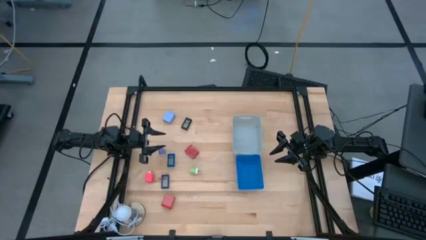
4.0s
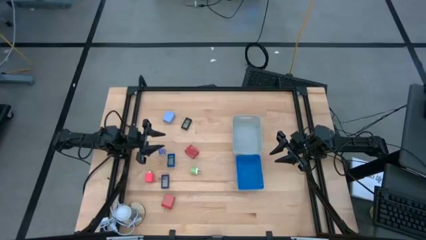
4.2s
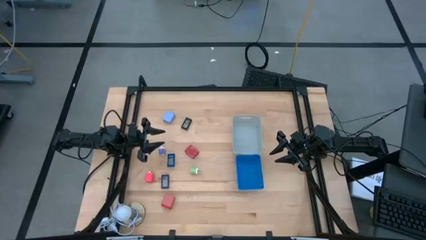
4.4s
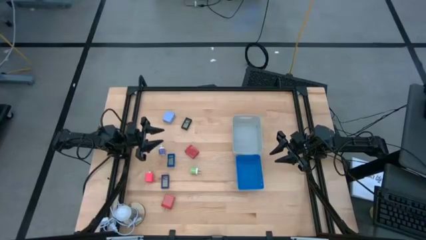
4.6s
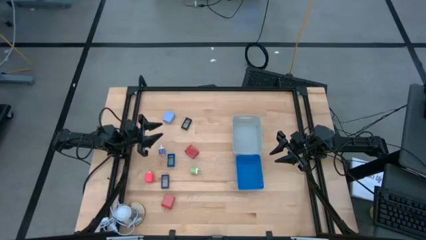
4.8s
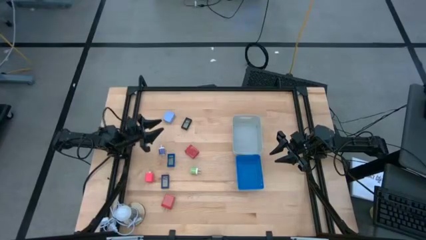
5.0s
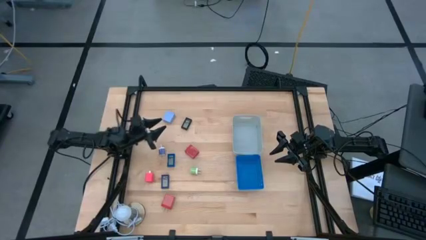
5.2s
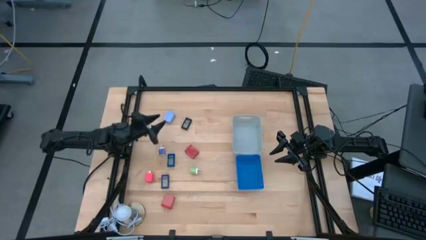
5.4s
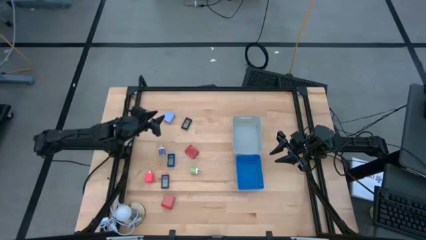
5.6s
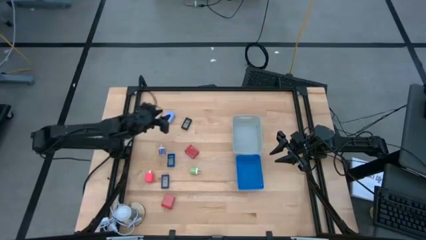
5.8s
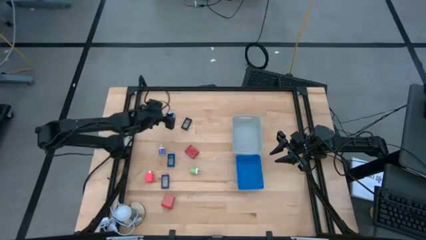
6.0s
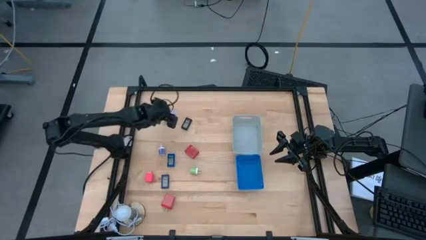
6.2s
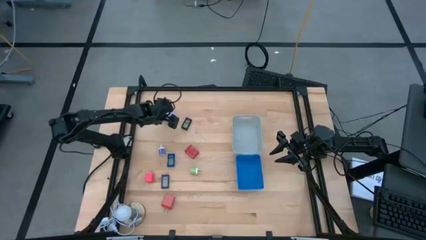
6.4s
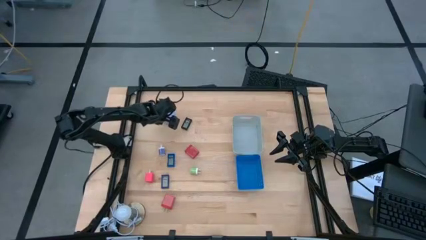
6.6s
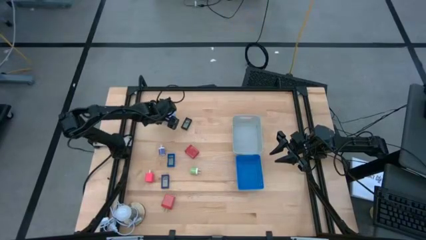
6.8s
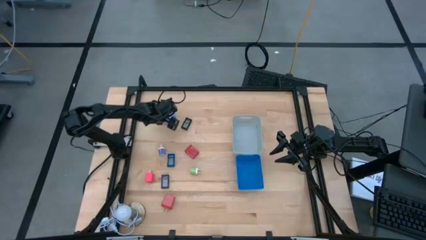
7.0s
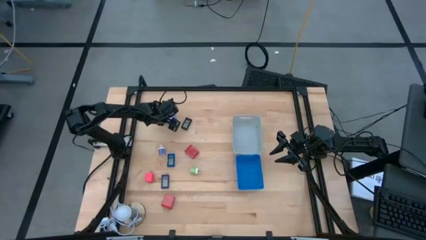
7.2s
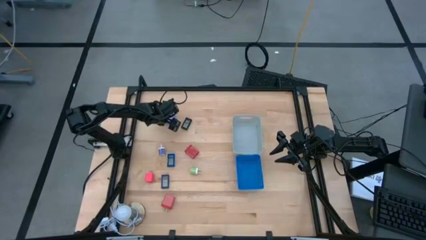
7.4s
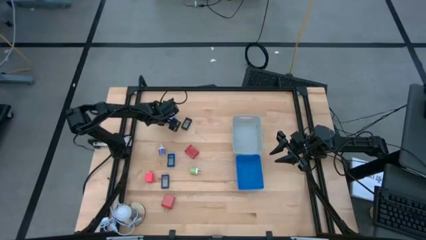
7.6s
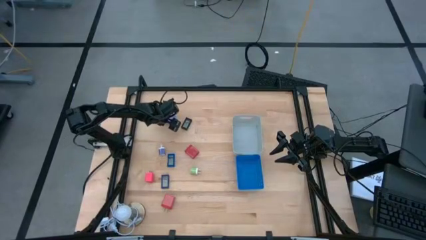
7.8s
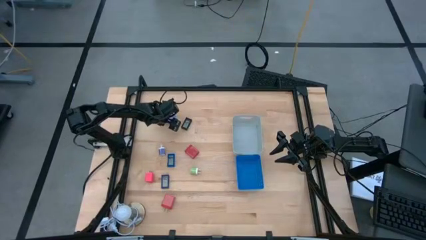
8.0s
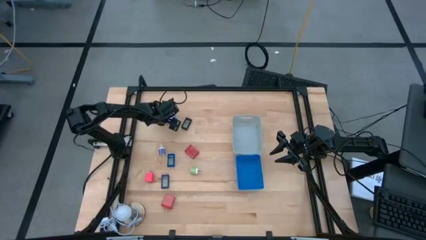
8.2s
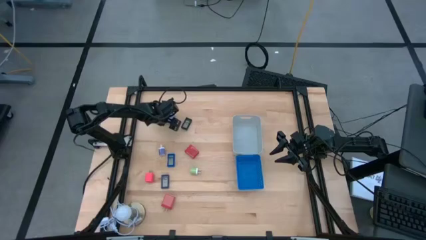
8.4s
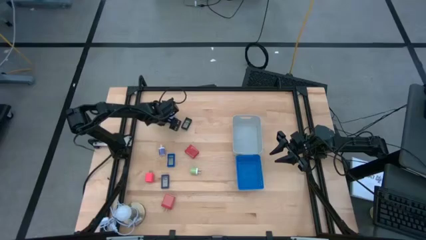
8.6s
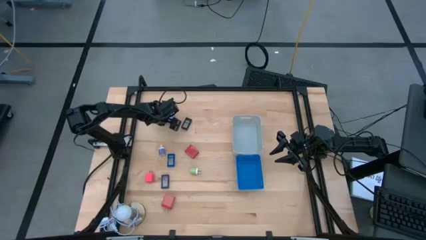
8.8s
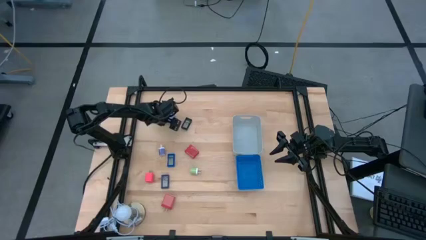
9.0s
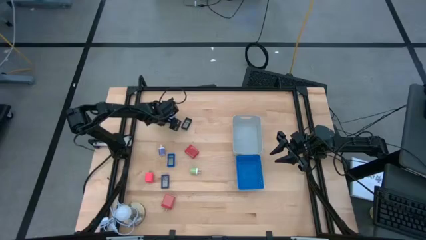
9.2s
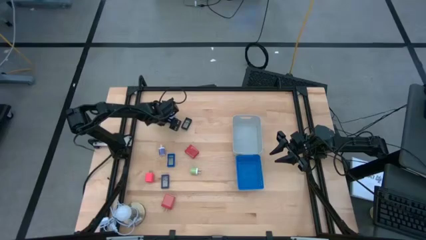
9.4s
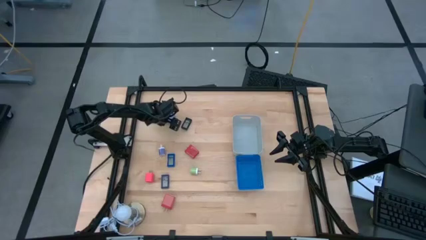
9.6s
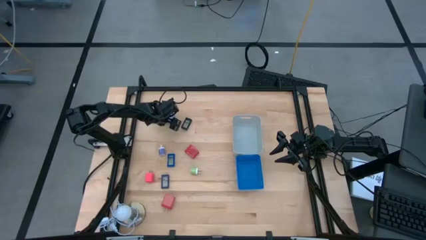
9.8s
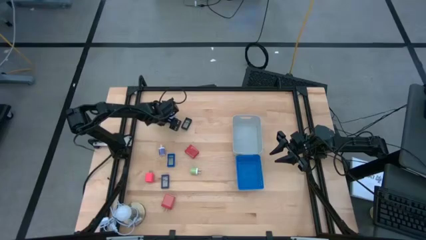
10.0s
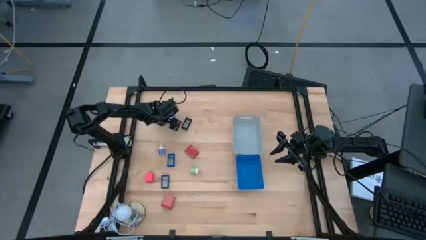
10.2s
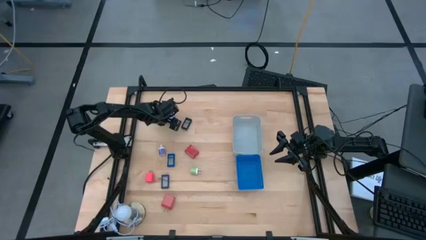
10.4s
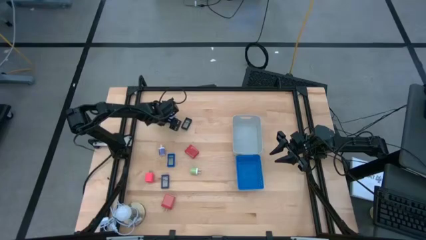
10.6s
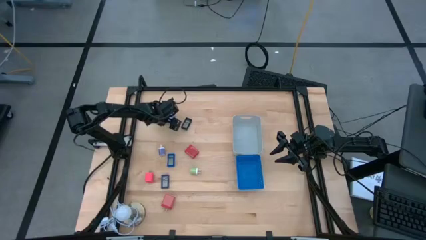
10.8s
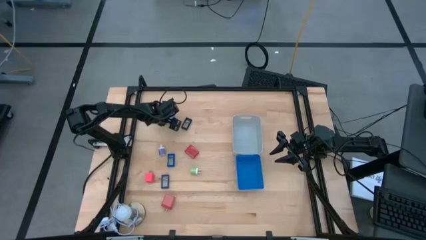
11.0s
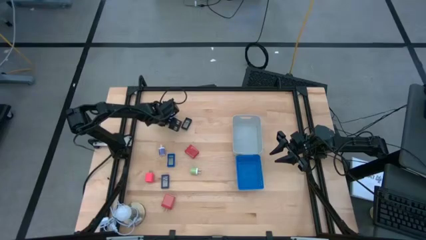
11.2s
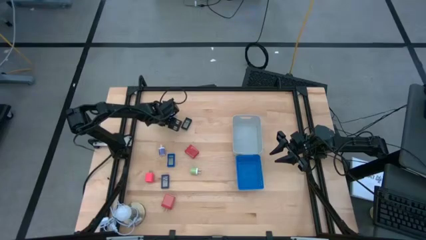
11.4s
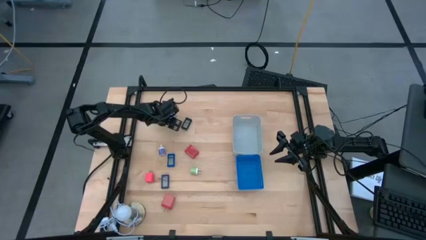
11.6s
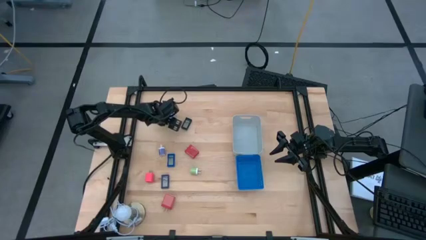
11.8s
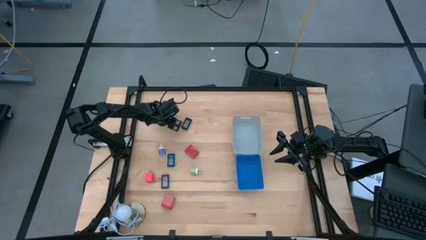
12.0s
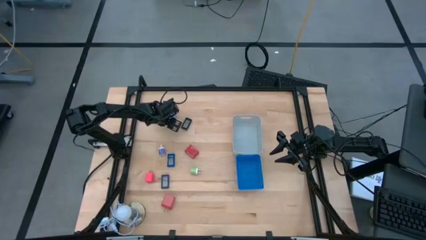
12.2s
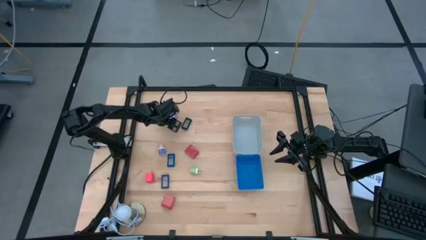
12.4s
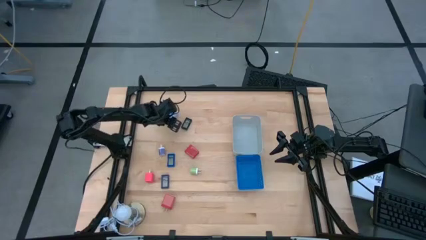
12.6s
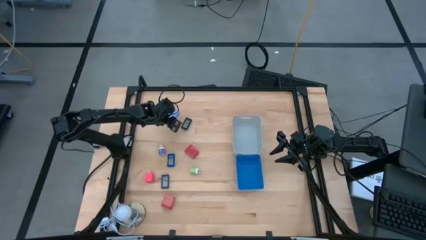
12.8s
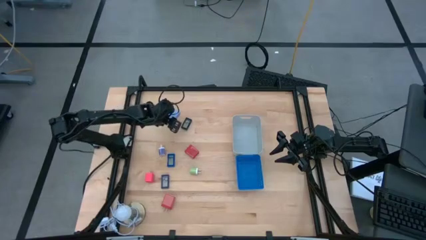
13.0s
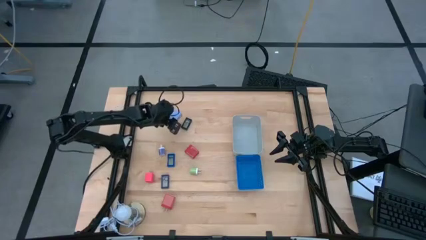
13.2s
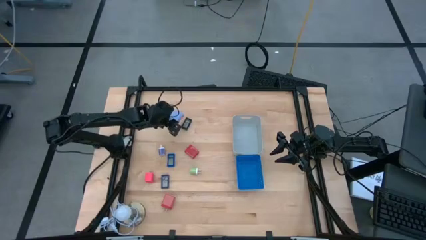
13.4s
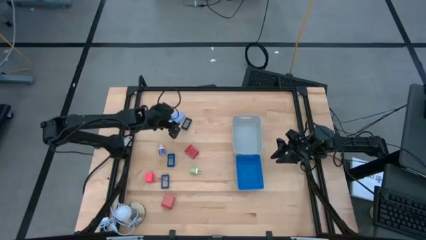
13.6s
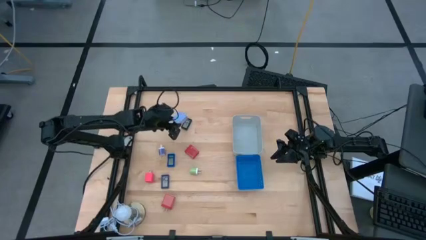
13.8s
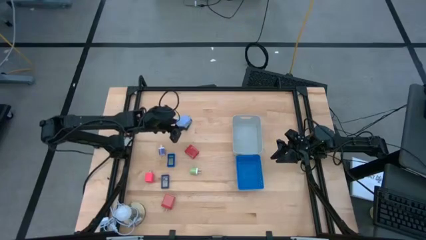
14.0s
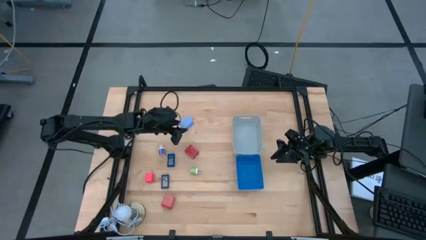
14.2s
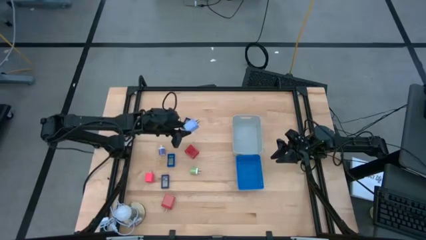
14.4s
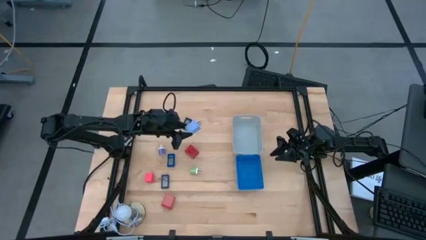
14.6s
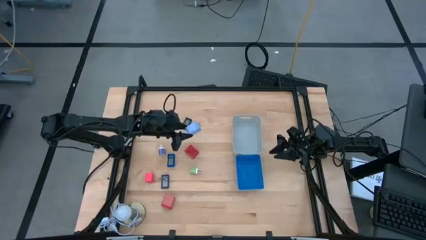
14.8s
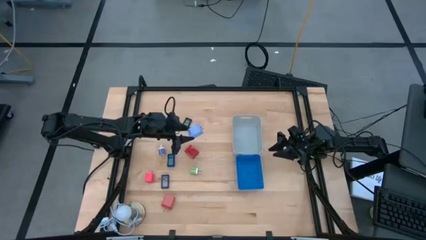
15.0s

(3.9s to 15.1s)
Task: Pick & Place Office items
Put the light blue charger adapter into the gray bin

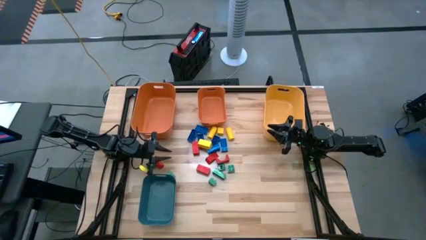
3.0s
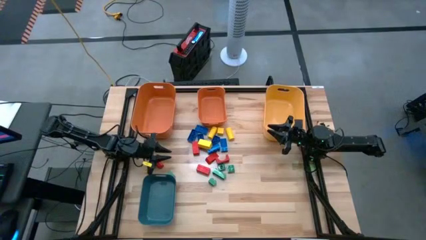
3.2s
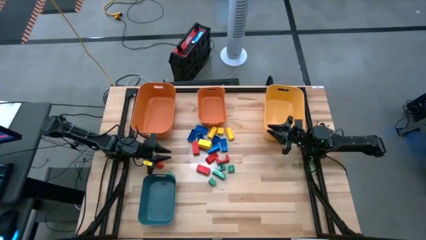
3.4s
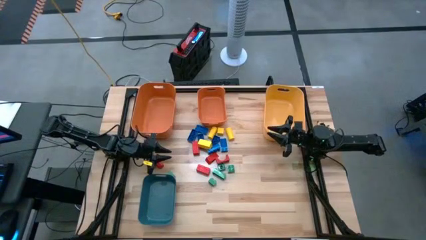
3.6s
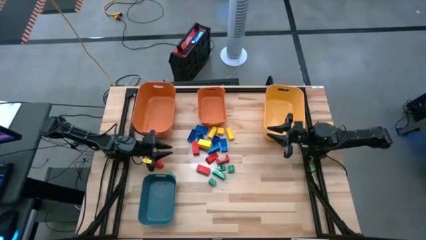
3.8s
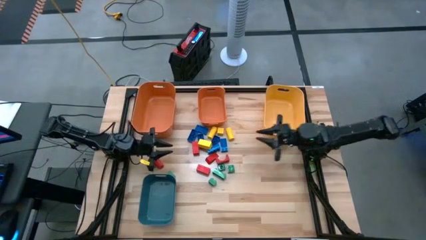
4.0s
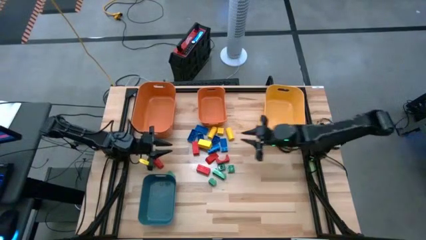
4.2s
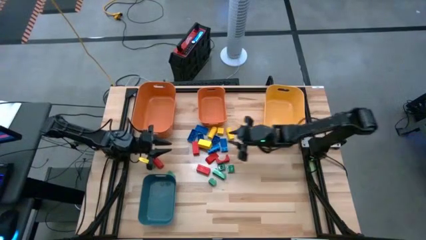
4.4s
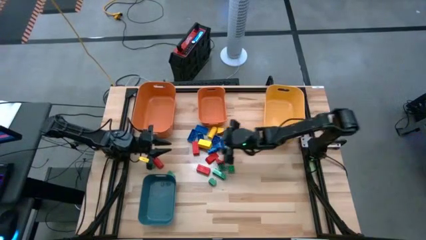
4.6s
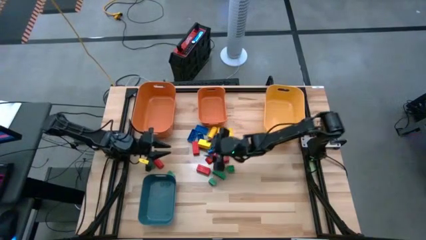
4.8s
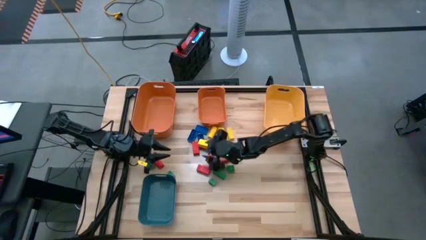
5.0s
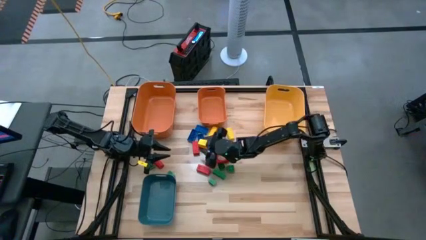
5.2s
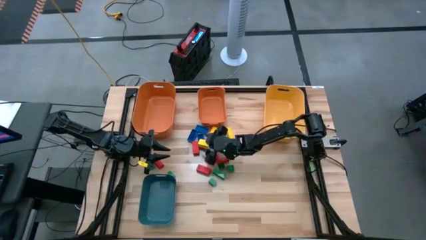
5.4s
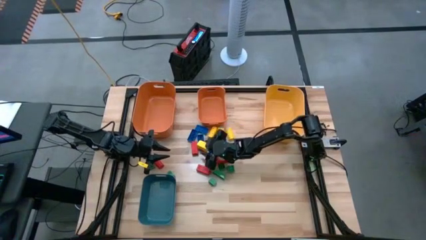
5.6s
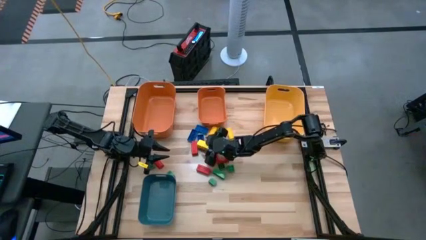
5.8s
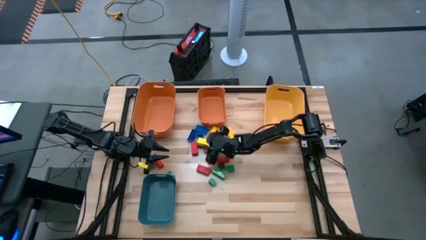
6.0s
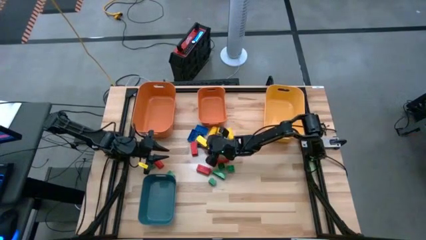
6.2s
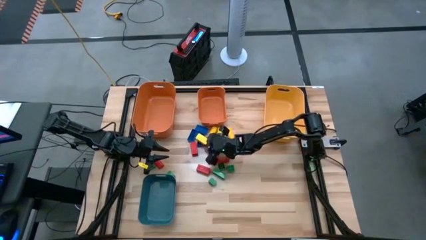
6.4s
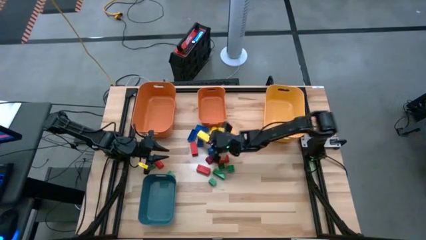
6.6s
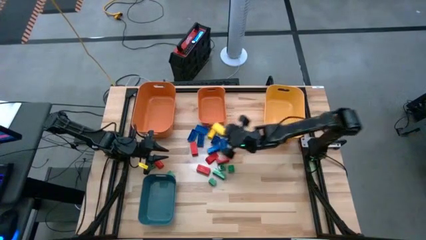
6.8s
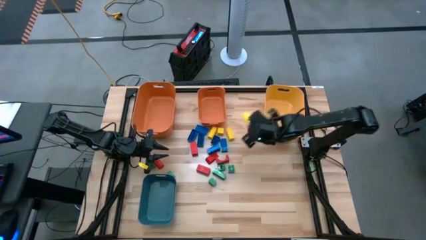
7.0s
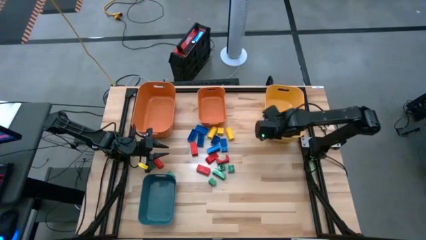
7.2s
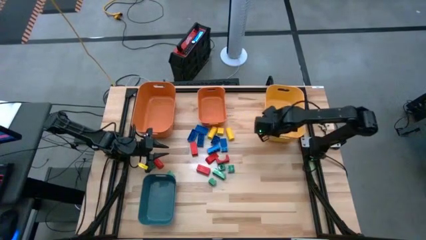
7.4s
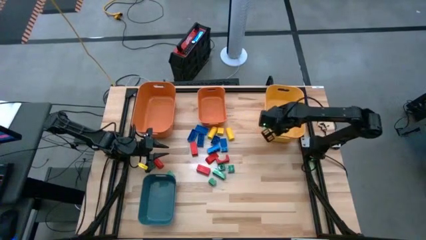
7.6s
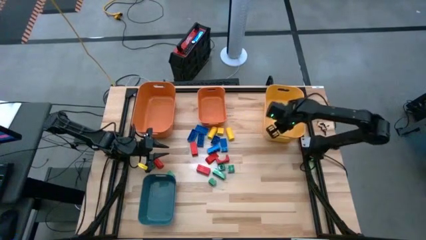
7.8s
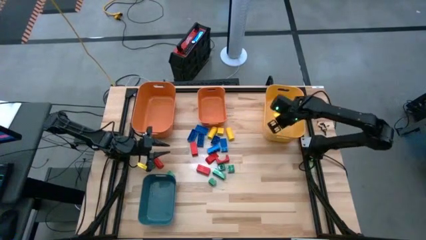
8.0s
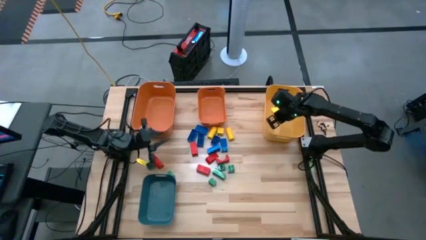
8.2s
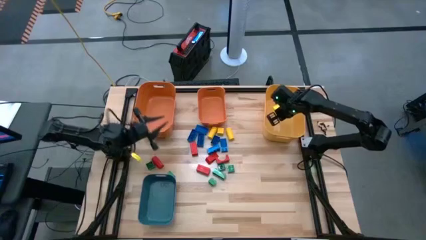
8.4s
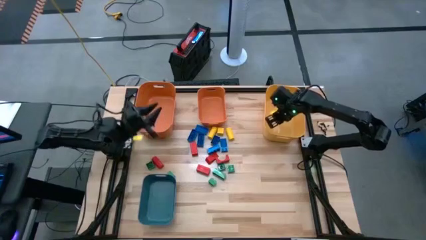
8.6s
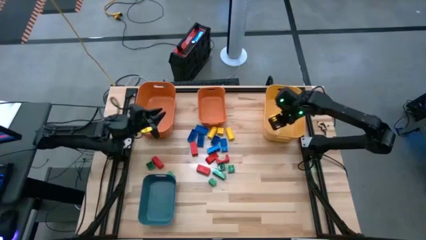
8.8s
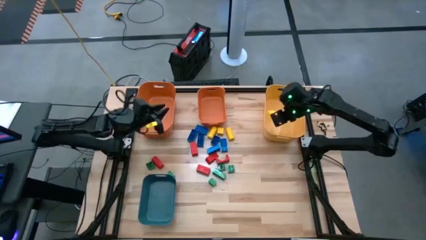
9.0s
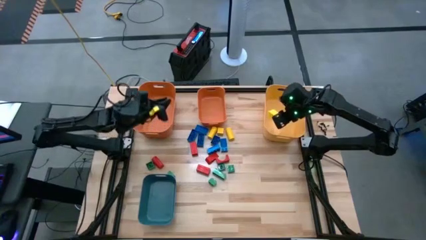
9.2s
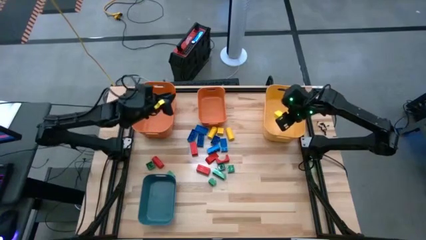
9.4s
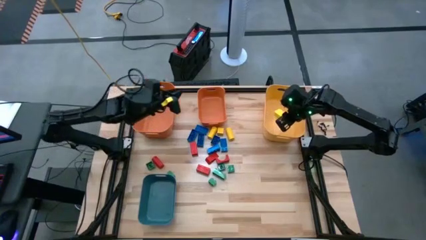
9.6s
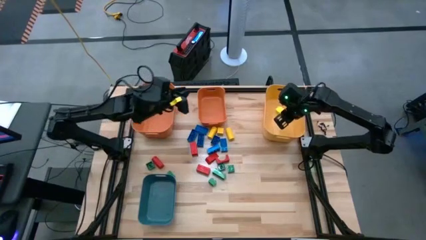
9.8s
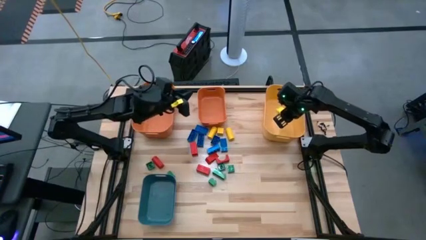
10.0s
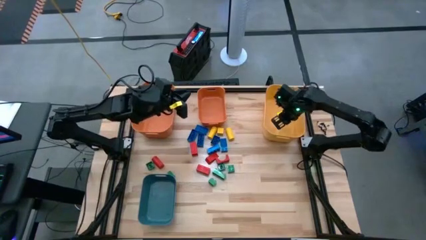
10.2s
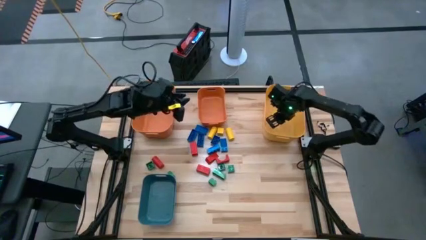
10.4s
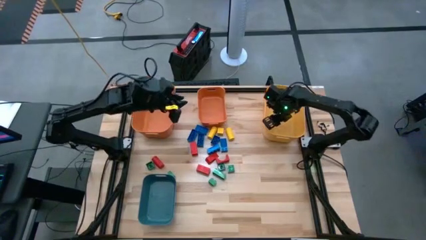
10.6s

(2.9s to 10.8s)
Task: Sort blocks
Put the yellow block into the yellow bin
